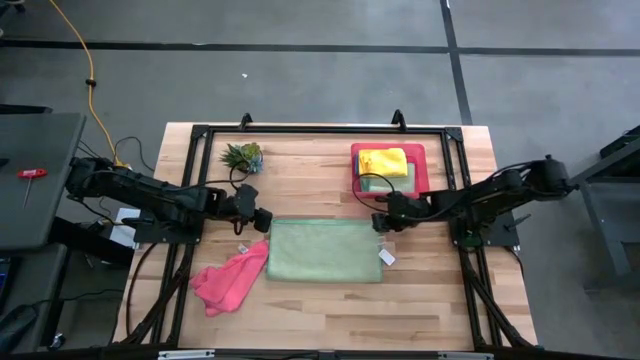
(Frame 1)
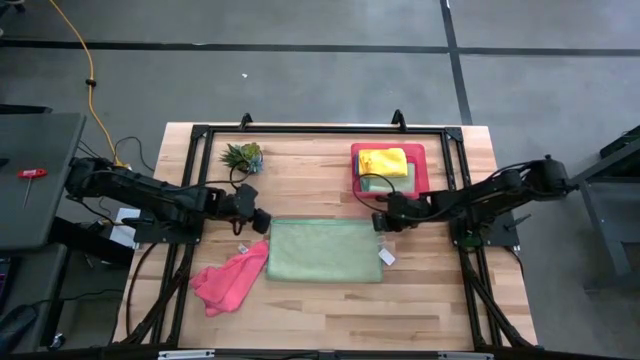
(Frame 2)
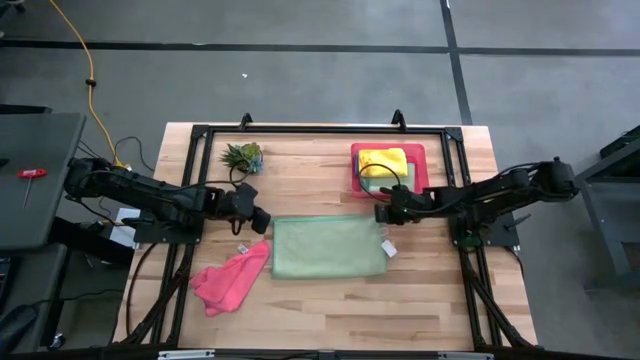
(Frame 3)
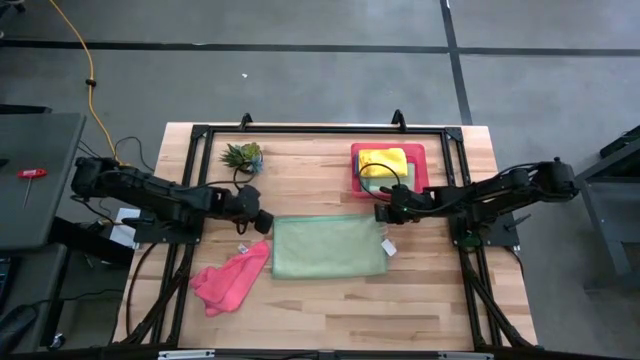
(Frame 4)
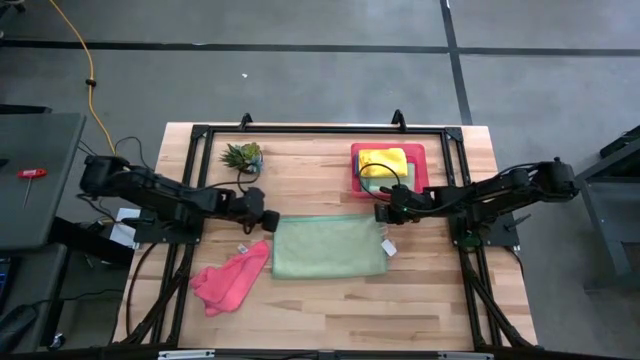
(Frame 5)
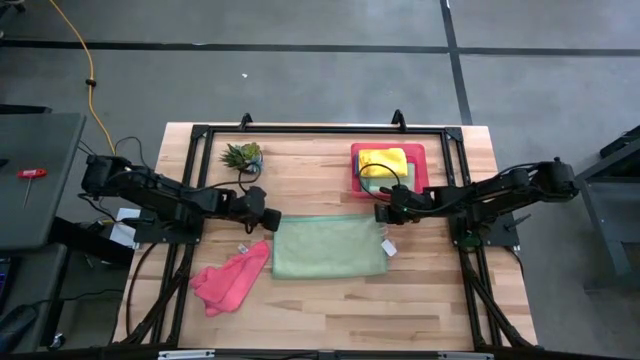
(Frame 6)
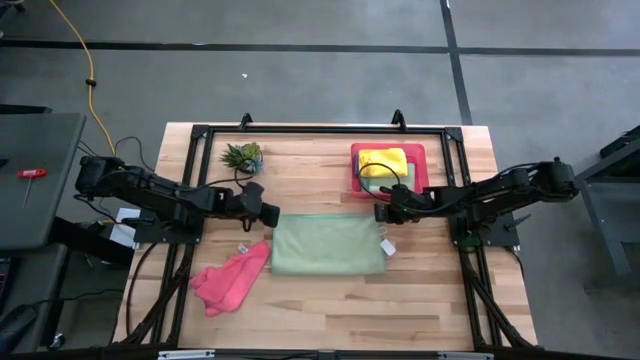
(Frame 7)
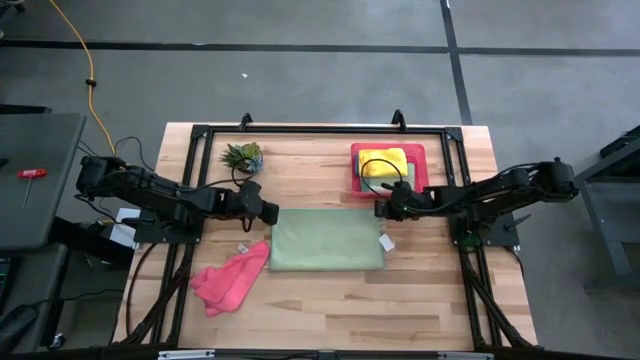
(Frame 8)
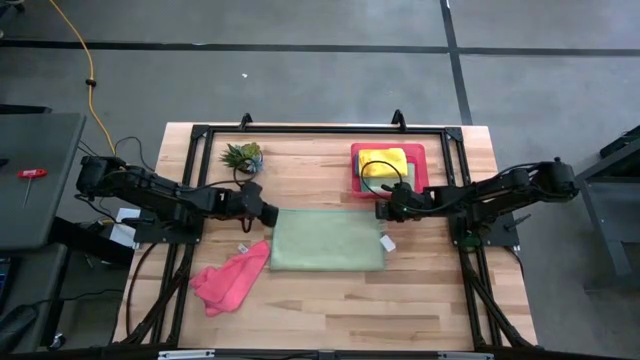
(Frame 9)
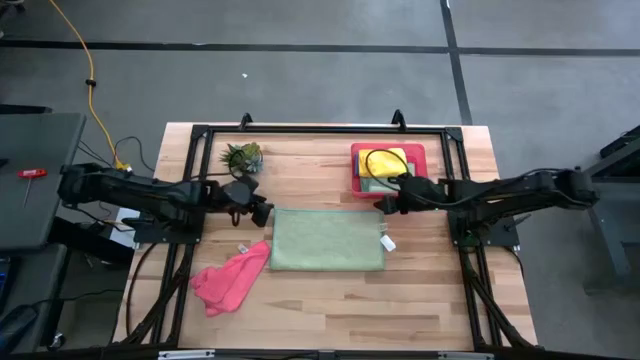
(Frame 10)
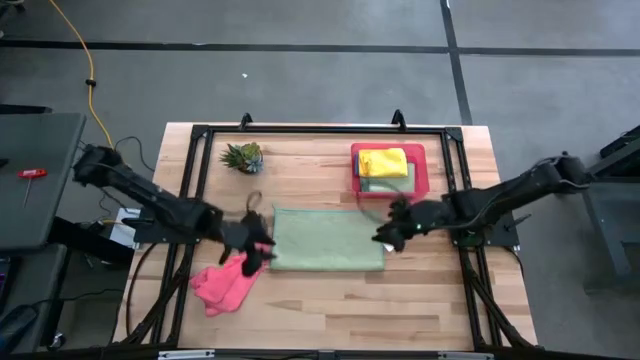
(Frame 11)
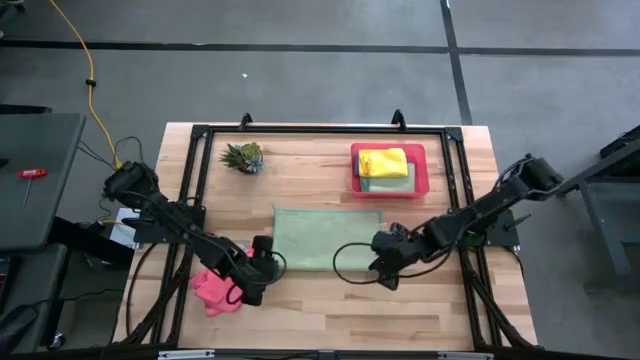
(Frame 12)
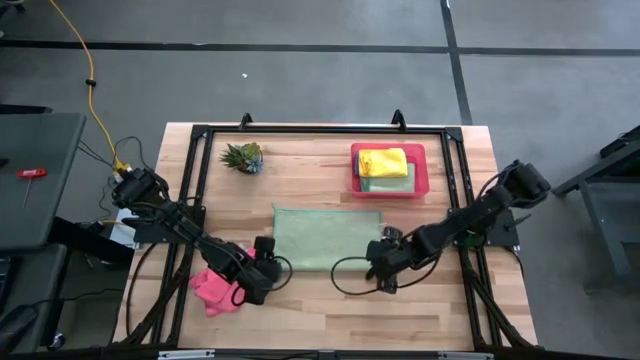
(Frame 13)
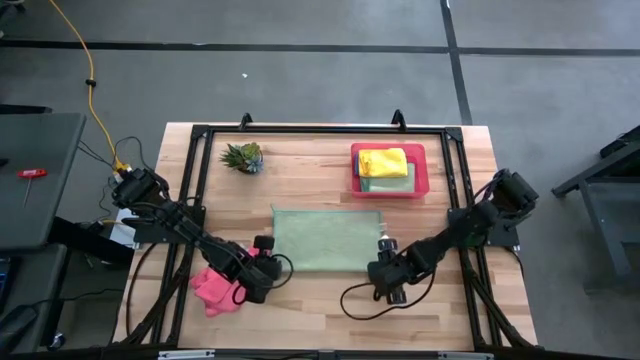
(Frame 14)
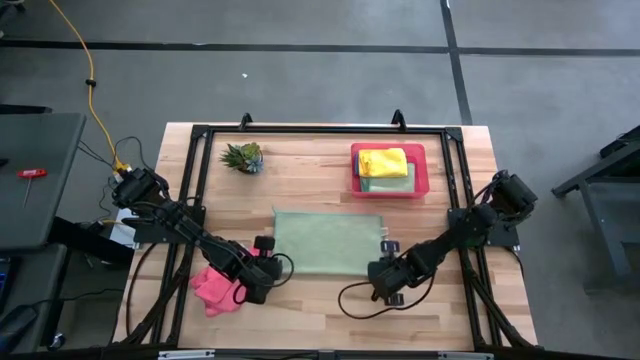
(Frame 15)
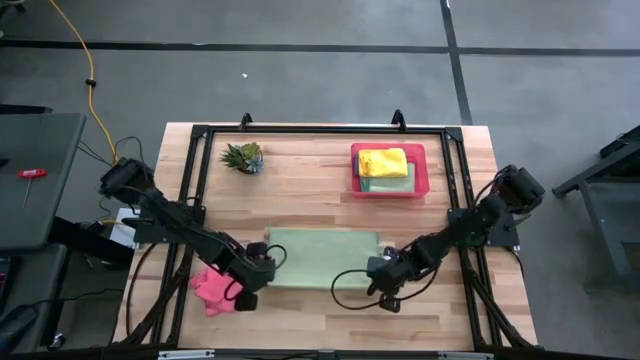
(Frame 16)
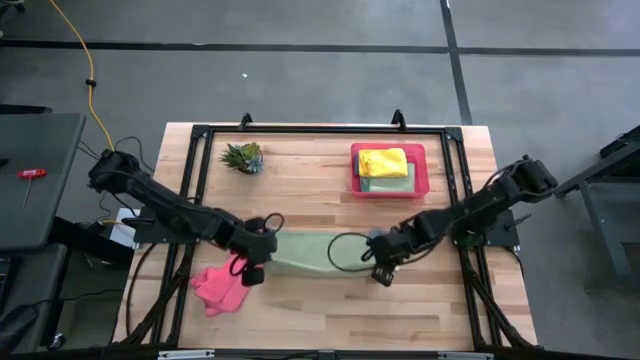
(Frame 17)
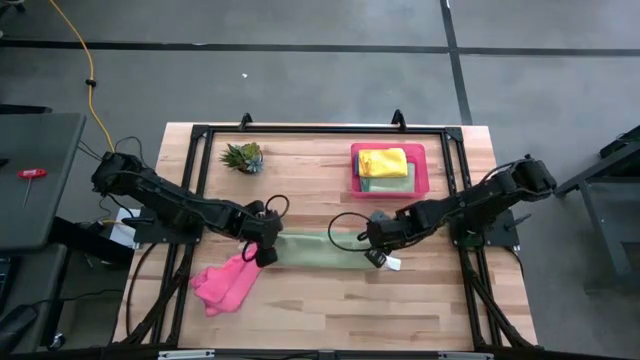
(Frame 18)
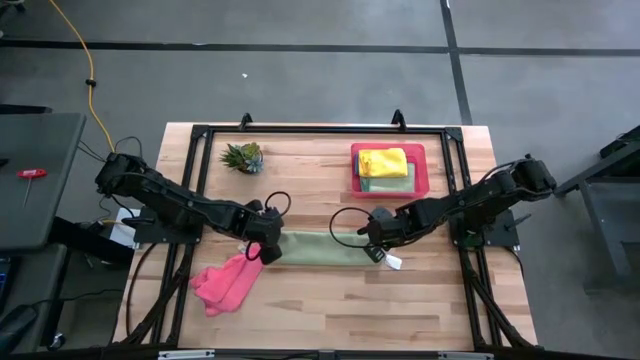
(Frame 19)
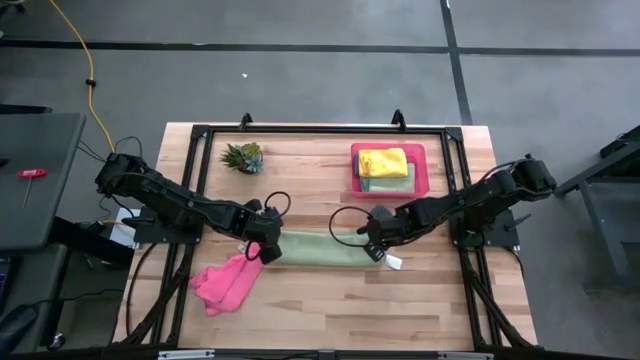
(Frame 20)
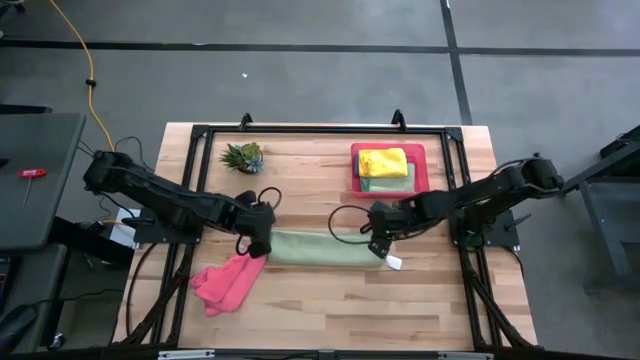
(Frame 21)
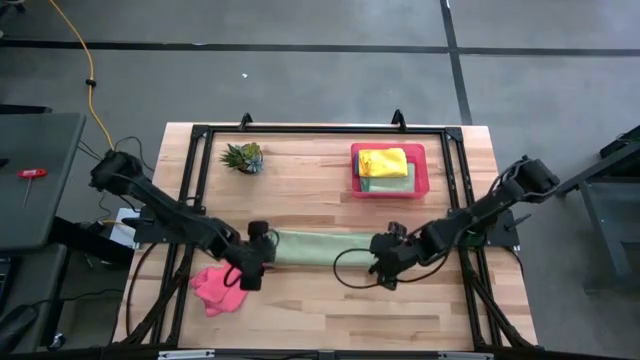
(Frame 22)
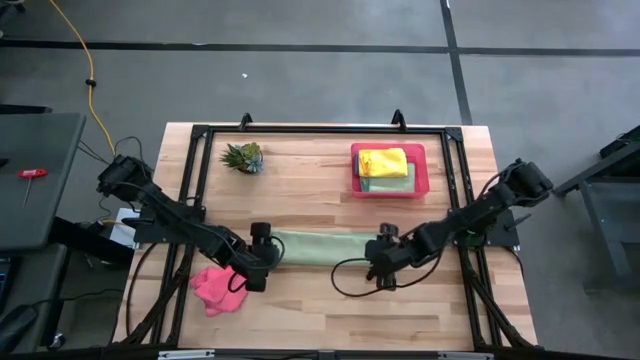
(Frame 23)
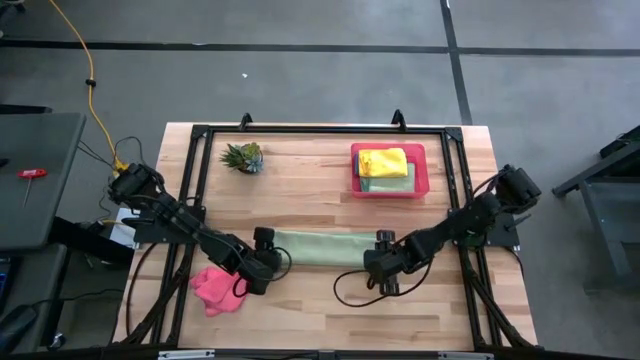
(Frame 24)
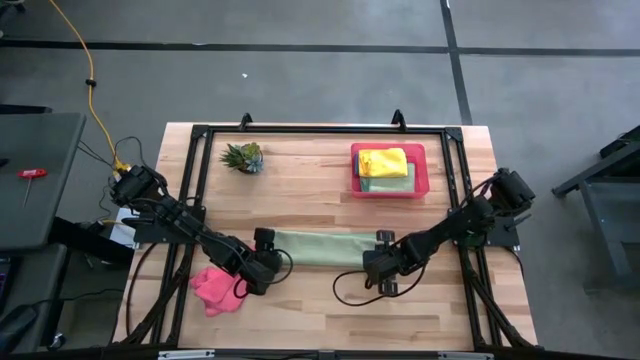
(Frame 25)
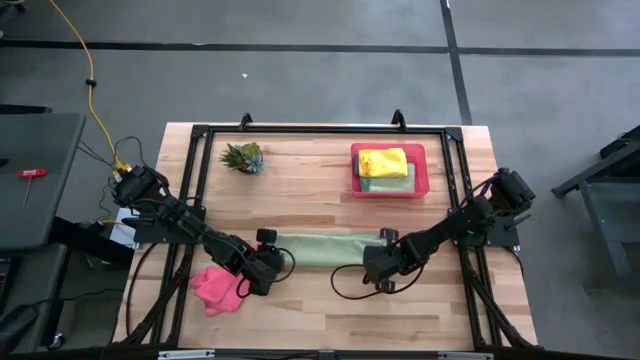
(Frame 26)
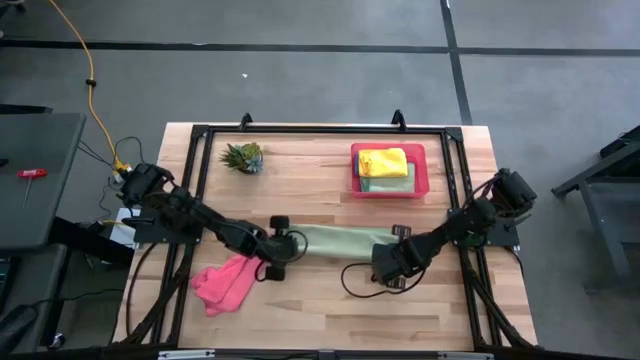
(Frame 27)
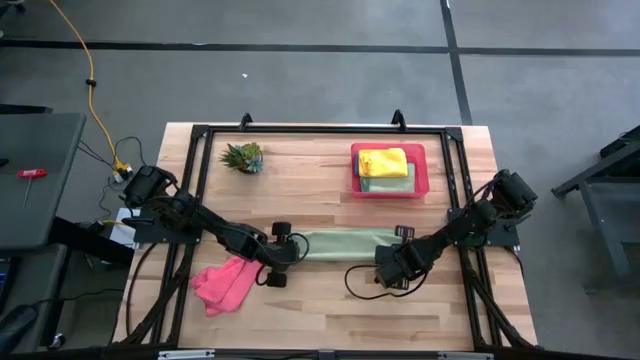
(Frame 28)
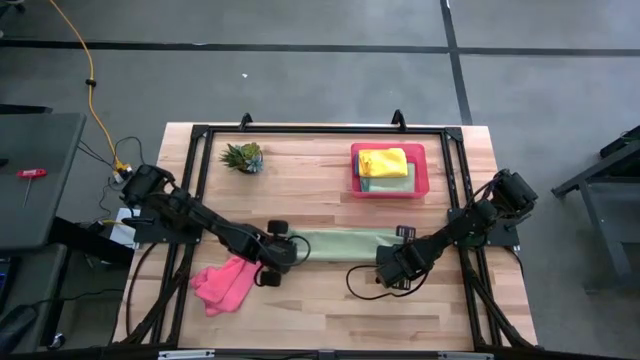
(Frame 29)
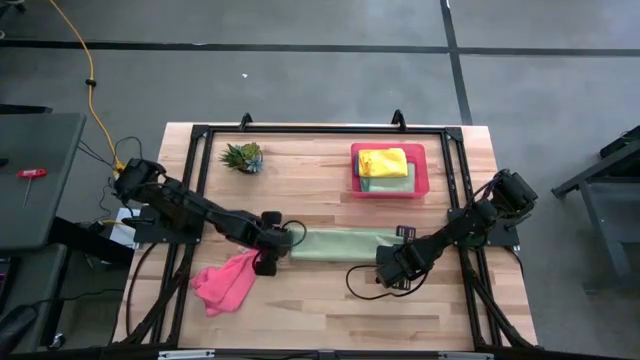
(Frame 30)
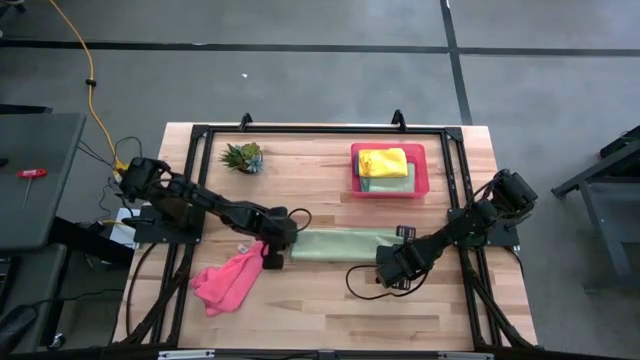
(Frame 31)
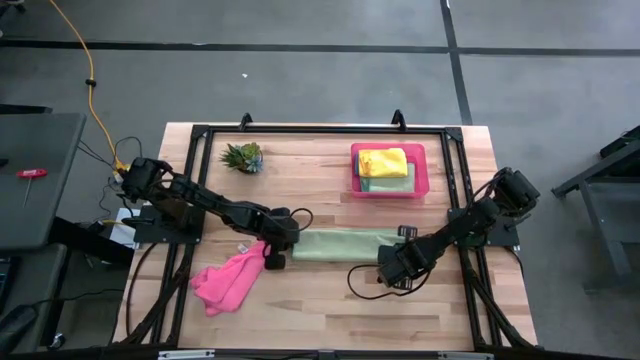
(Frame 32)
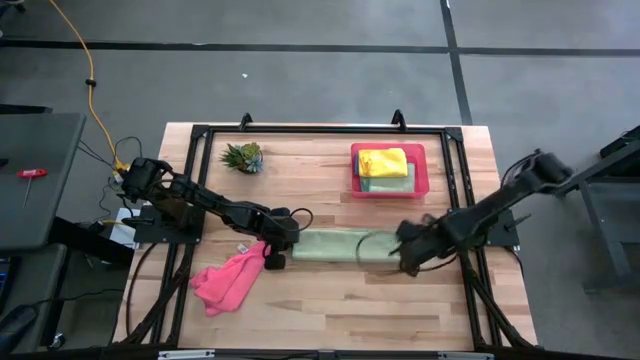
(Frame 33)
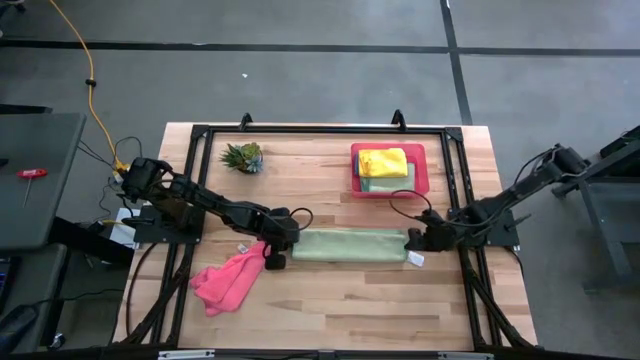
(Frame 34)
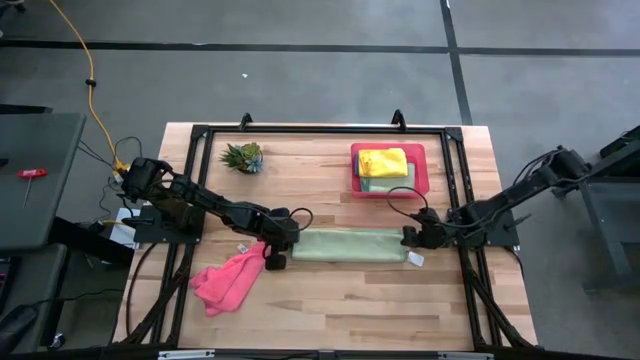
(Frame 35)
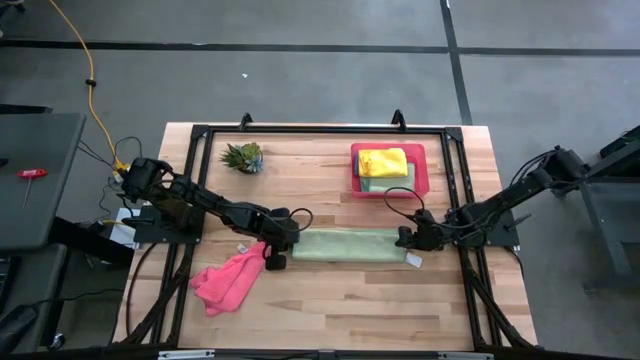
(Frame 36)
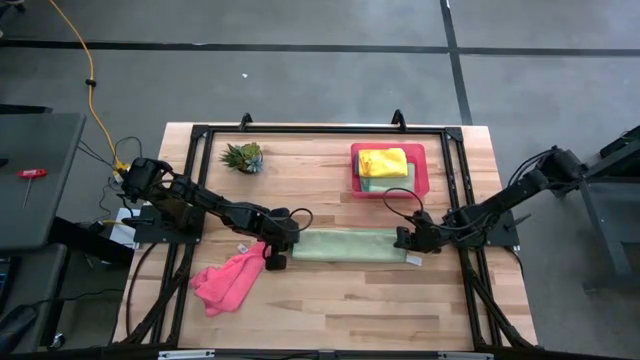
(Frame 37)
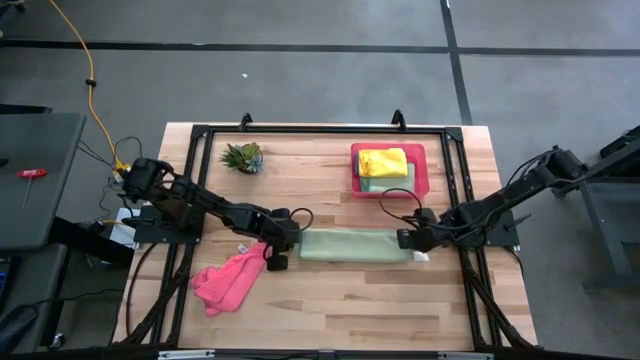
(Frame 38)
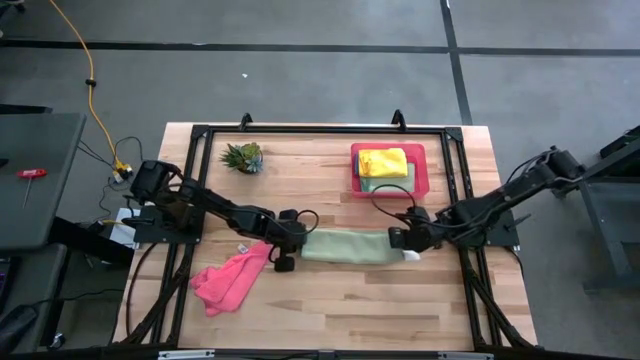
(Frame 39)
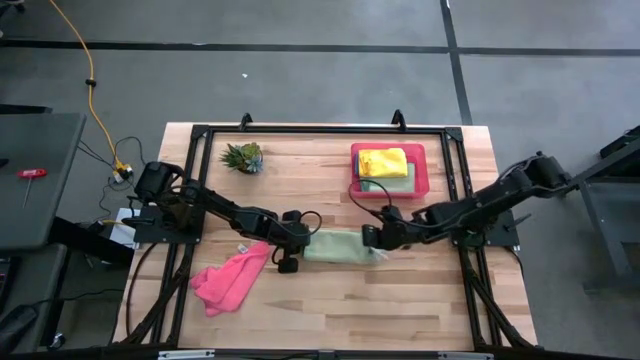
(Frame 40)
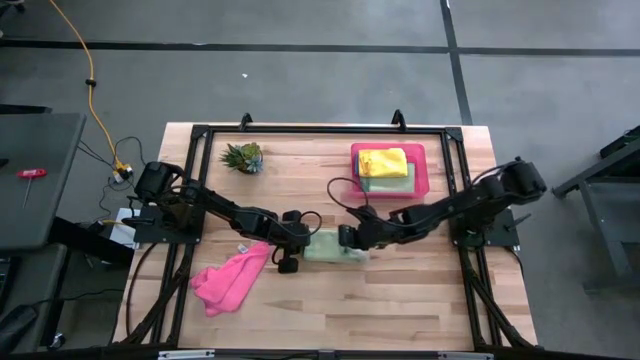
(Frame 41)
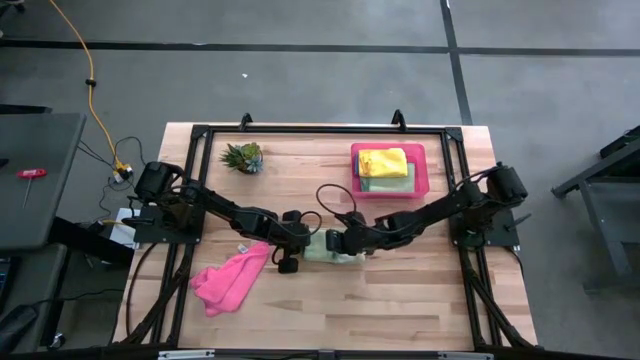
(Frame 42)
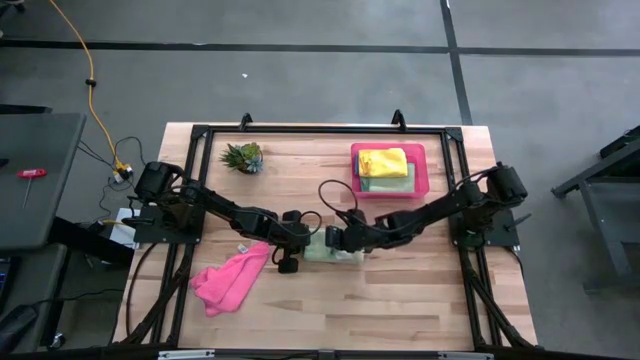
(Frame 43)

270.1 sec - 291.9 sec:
Task: Fold microfiber towels
Fold the green microfiber cloth
